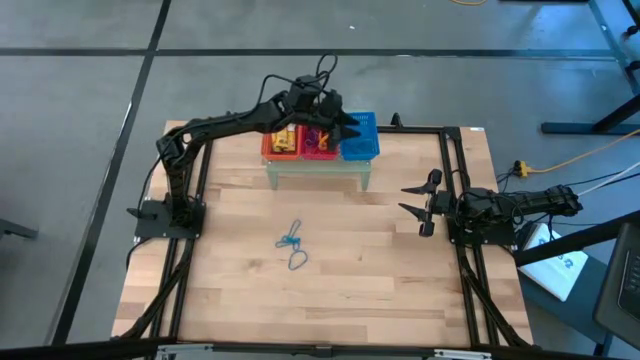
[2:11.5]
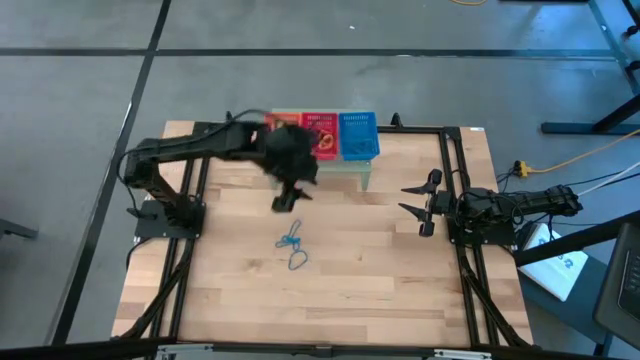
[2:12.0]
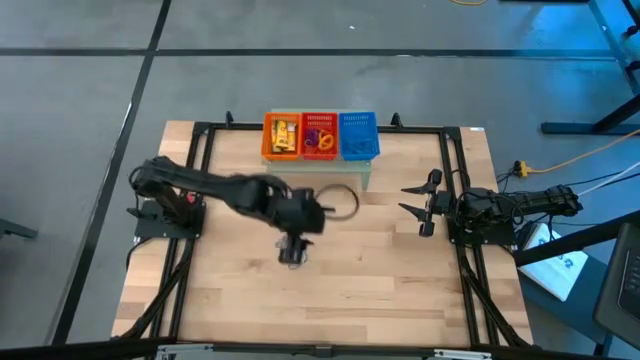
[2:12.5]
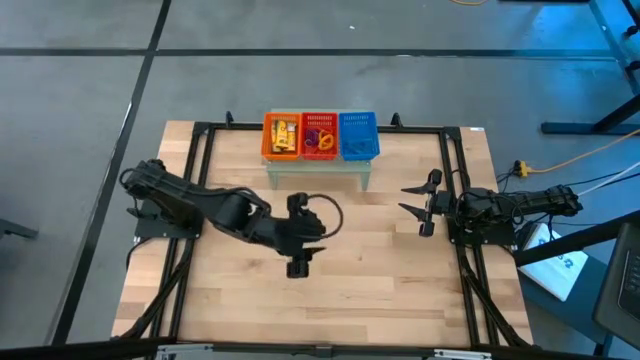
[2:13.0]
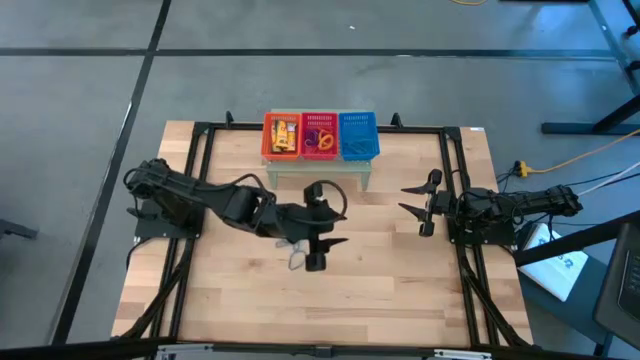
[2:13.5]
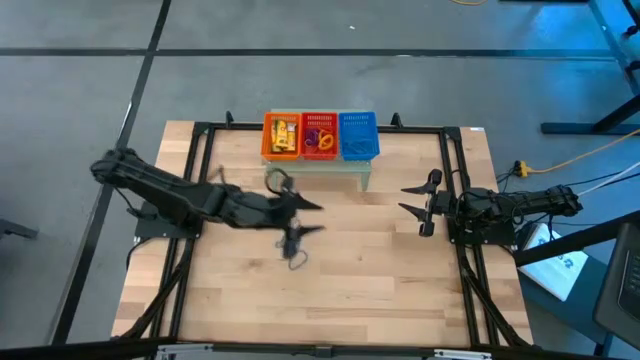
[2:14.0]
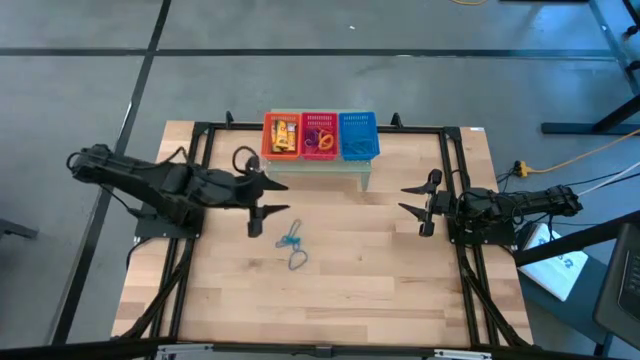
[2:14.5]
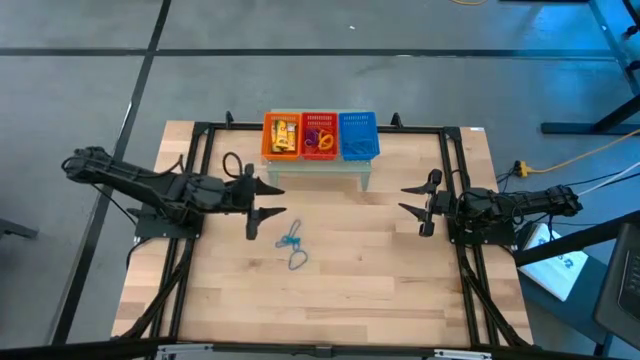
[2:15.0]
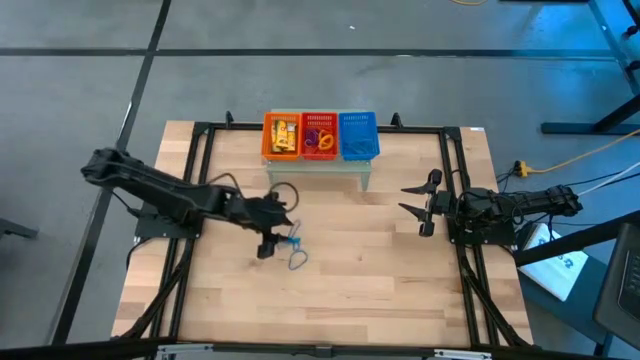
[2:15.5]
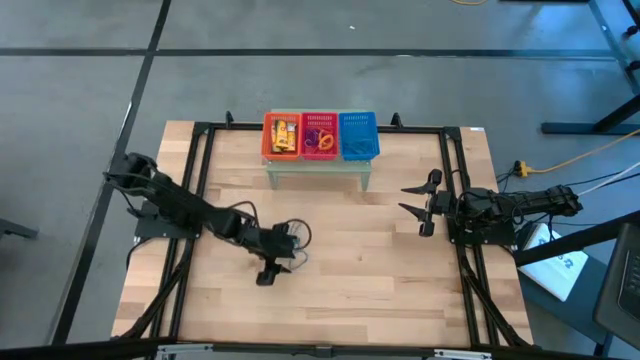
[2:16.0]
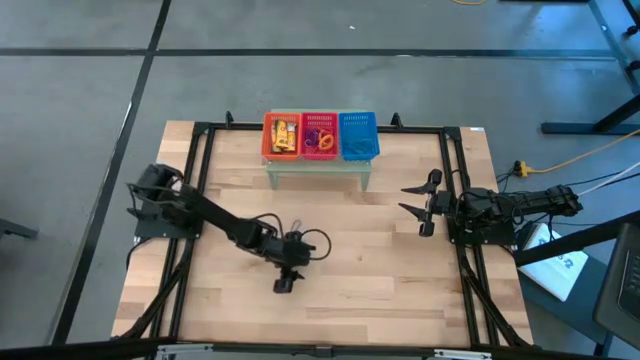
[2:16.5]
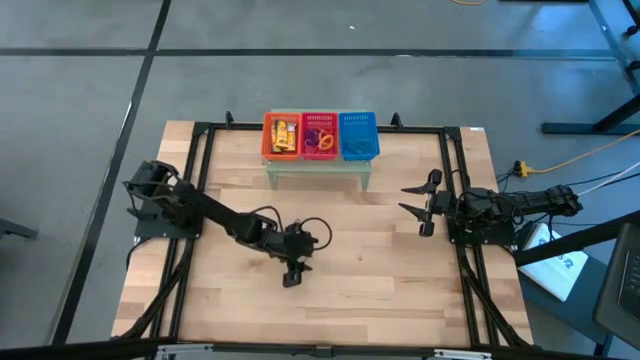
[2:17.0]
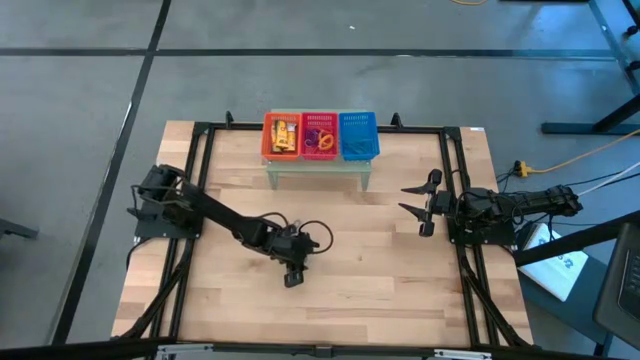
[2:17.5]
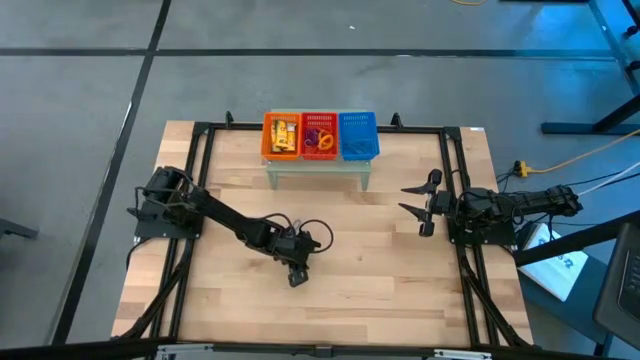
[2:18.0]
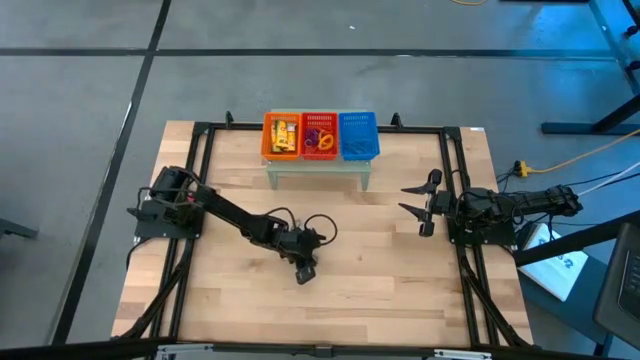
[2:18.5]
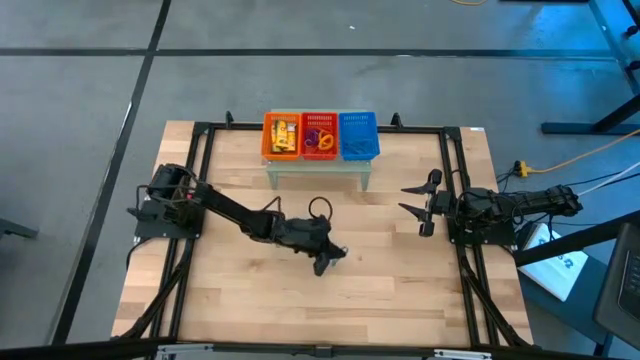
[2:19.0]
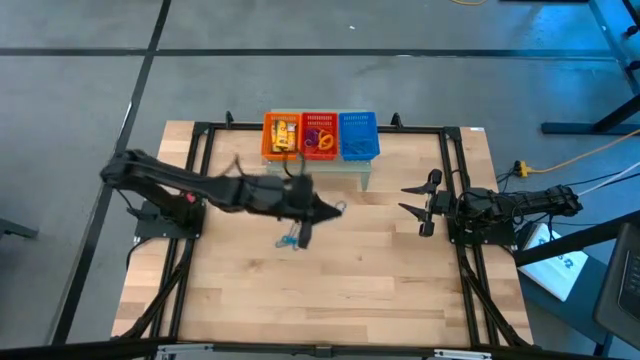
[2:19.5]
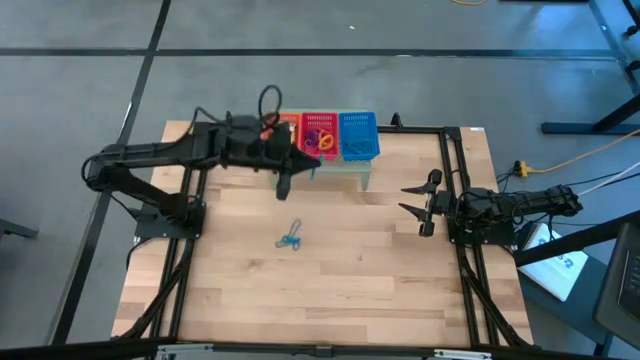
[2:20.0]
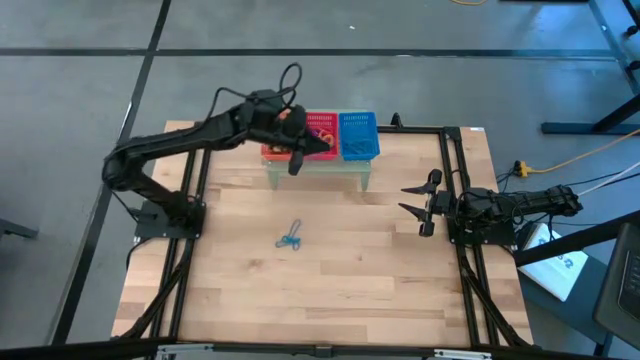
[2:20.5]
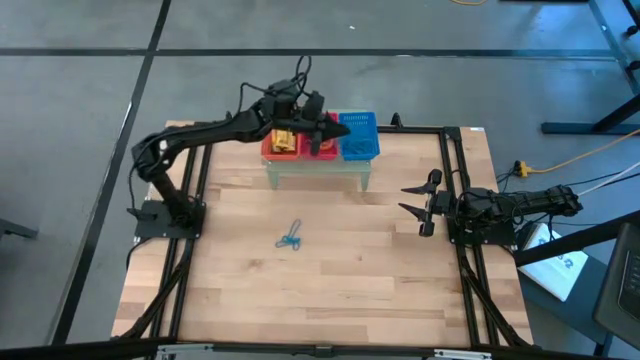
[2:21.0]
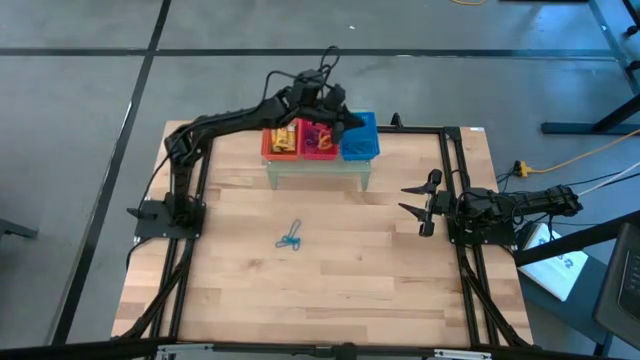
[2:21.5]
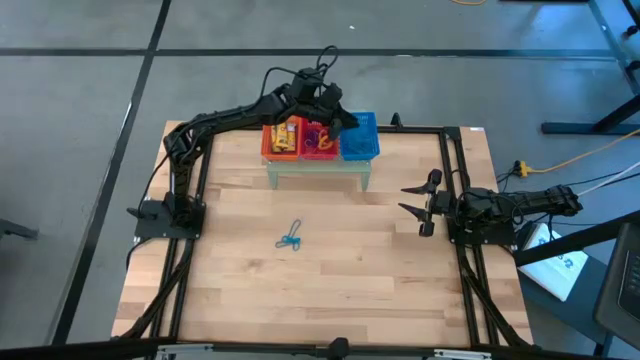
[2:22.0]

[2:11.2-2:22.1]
Task: Pick & Place Office Desk Supplies
Put the blue rubber band into the blue bin on the shelf

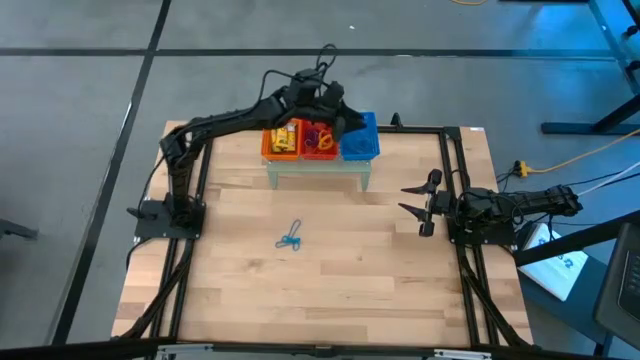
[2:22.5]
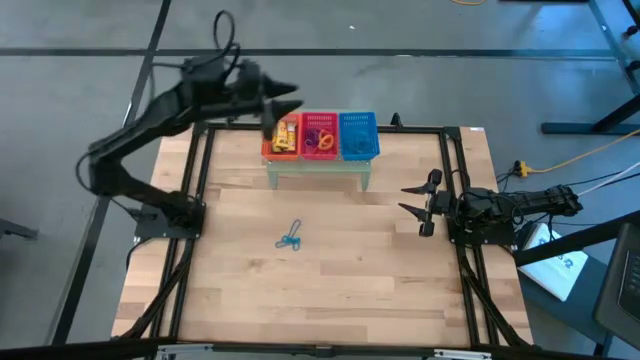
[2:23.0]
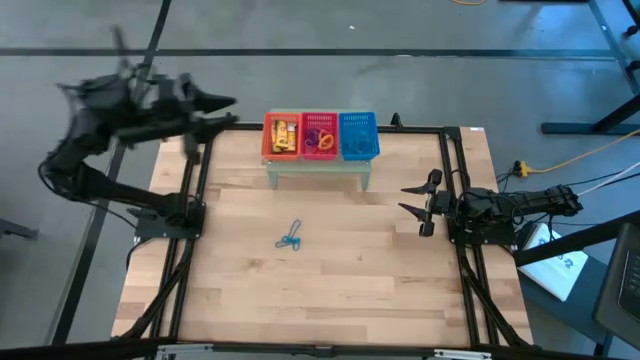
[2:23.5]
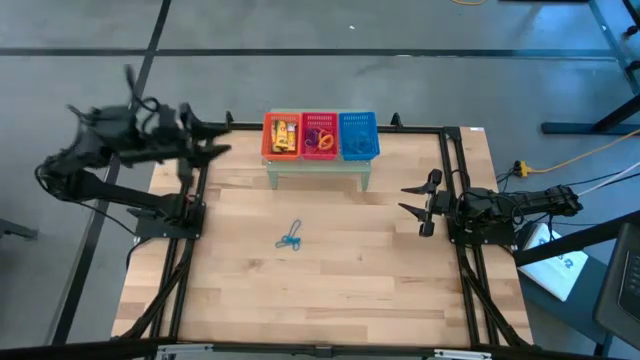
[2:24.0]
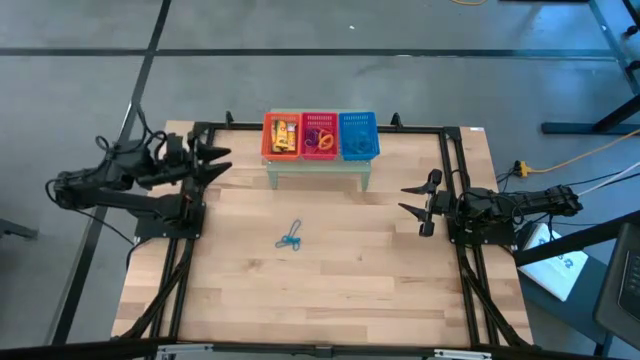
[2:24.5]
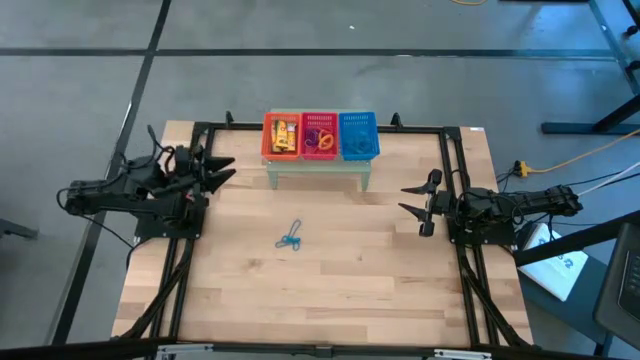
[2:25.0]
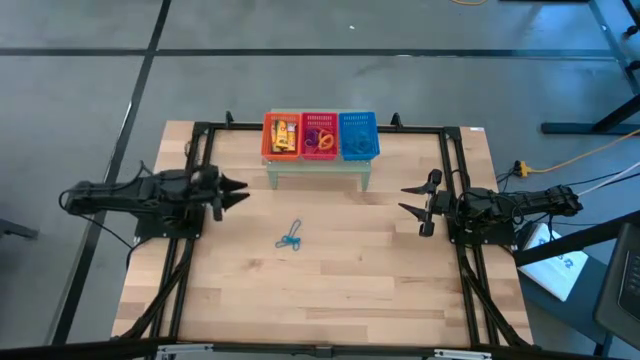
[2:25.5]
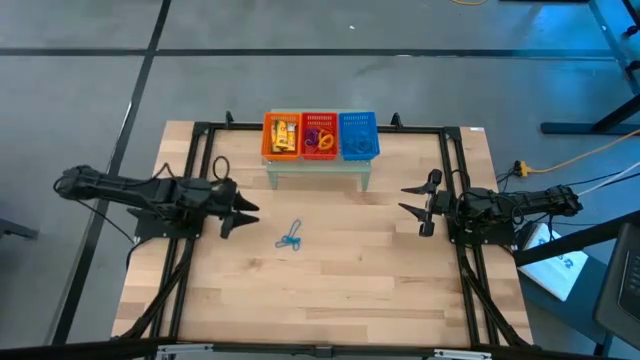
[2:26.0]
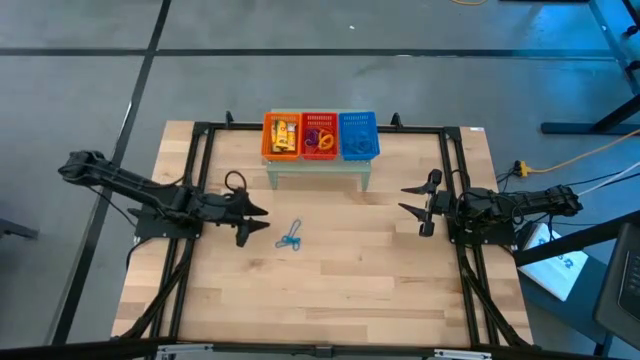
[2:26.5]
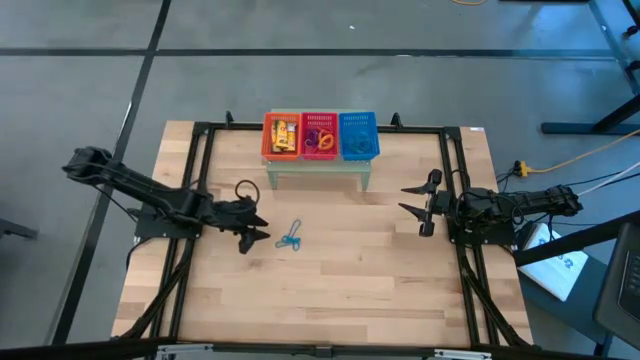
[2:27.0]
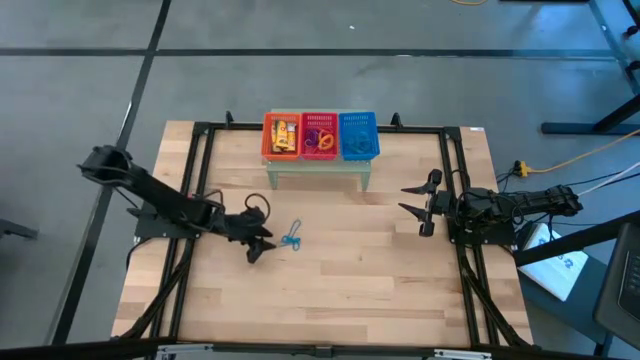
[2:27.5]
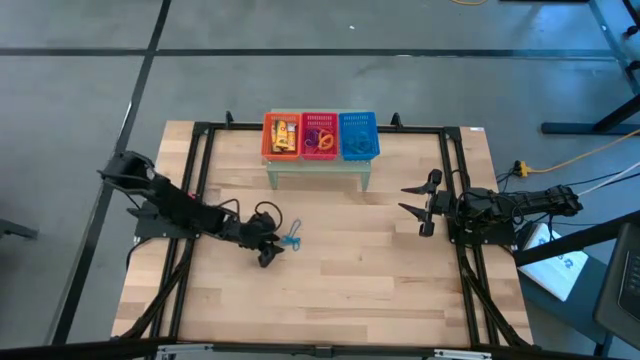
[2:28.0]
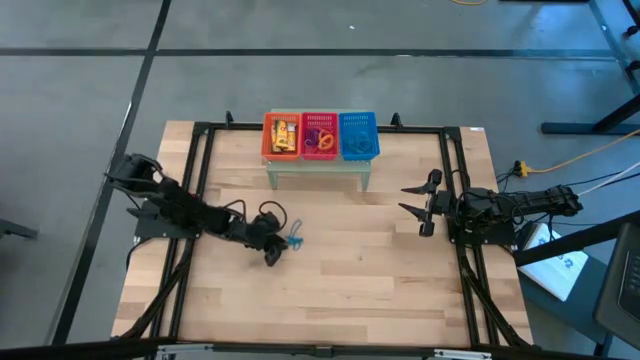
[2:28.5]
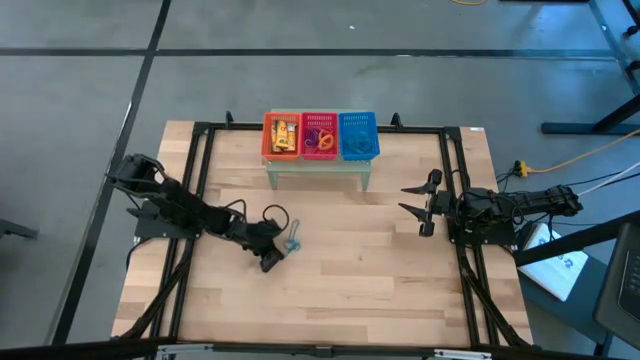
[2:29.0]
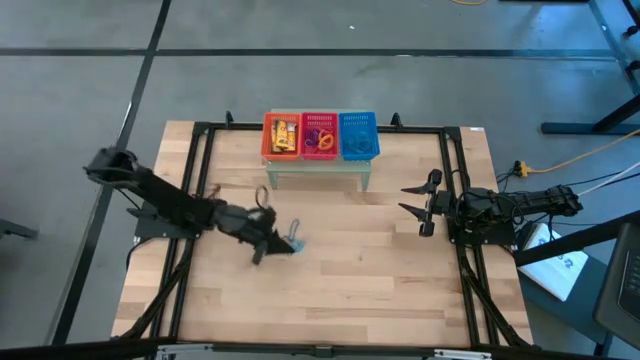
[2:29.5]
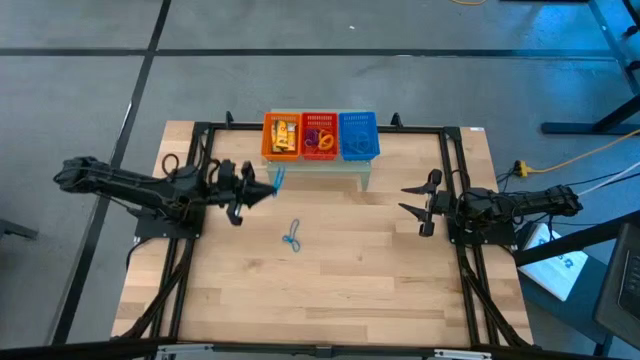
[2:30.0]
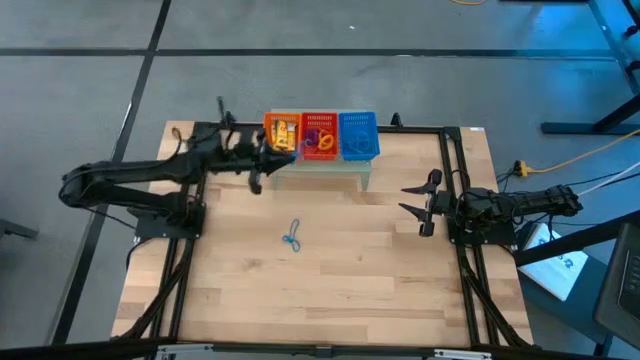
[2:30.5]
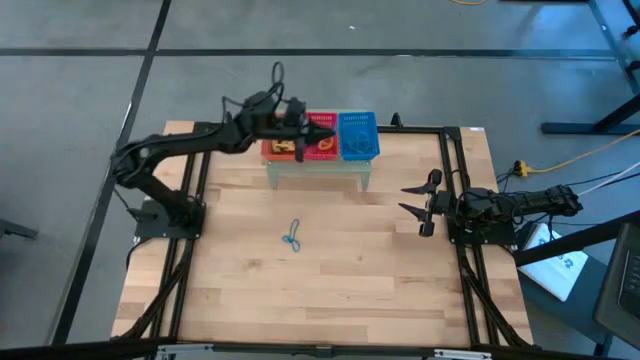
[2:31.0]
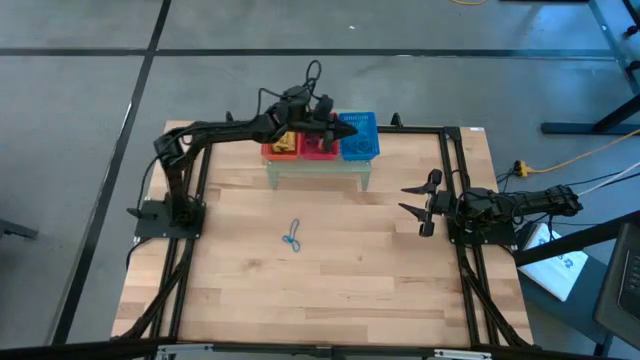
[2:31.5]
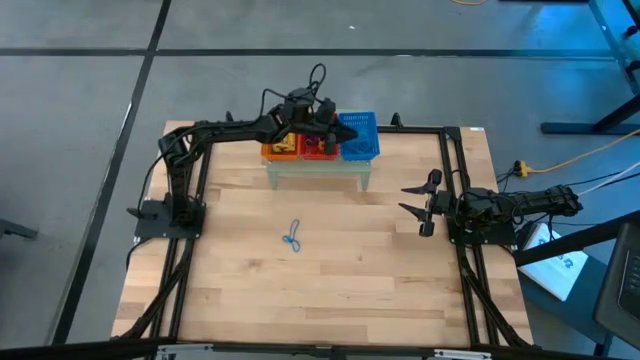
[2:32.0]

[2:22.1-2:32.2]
Put the blue rubber band into the blue bin on the shelf
